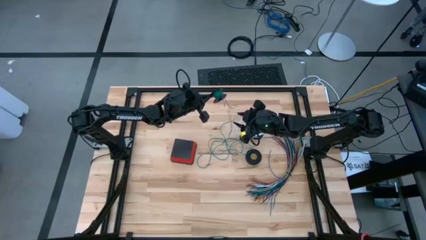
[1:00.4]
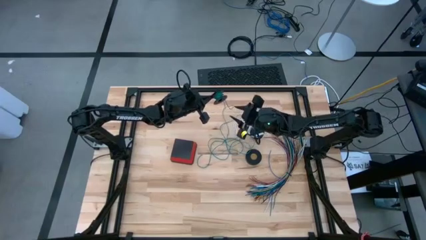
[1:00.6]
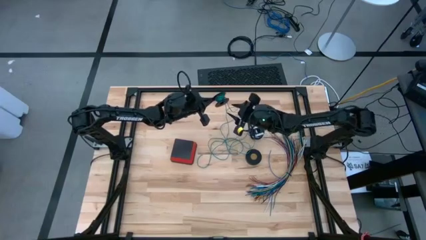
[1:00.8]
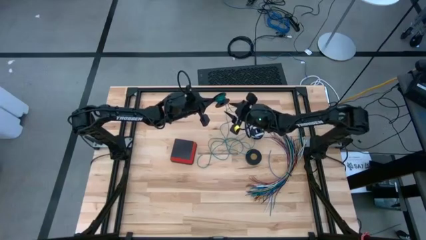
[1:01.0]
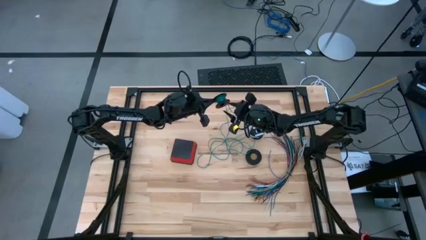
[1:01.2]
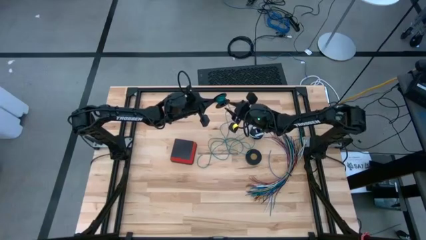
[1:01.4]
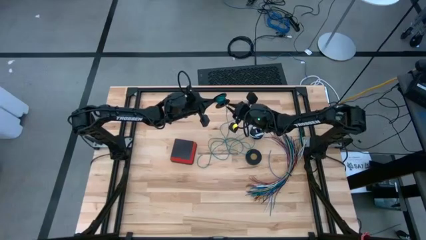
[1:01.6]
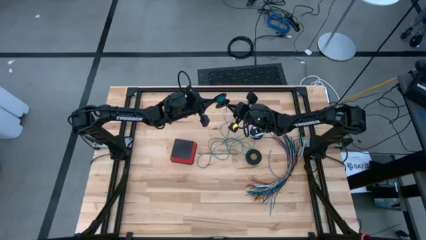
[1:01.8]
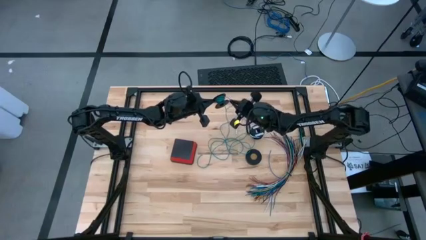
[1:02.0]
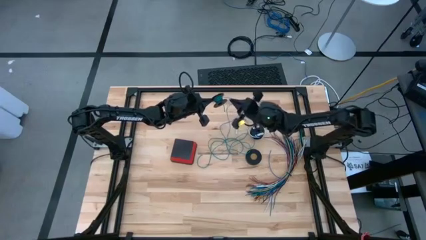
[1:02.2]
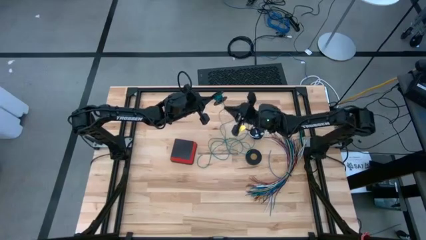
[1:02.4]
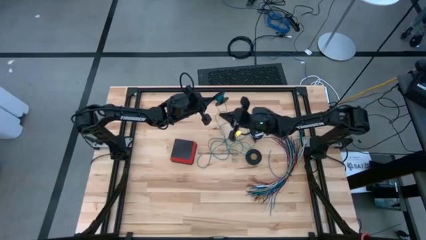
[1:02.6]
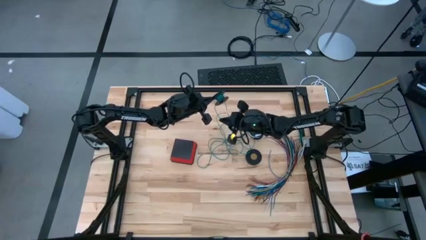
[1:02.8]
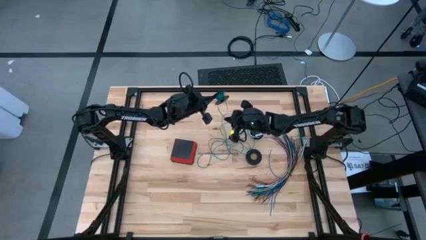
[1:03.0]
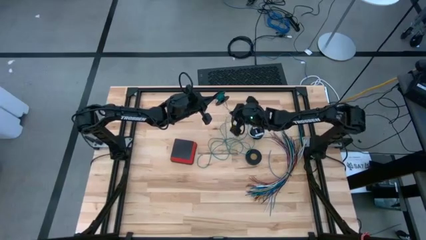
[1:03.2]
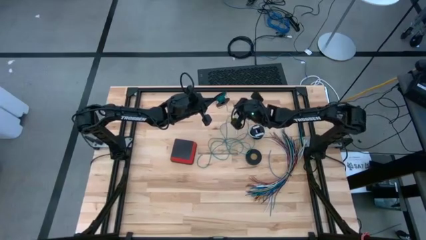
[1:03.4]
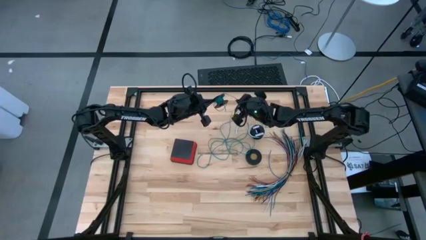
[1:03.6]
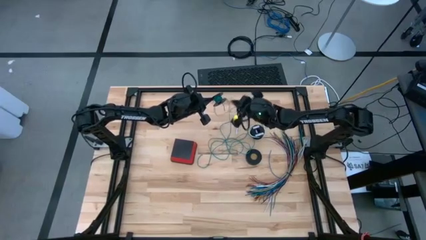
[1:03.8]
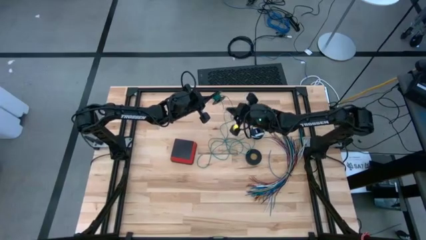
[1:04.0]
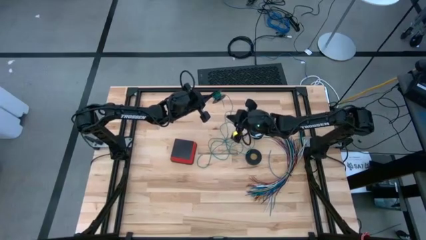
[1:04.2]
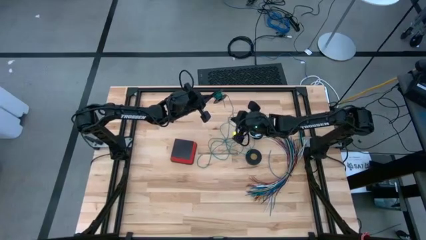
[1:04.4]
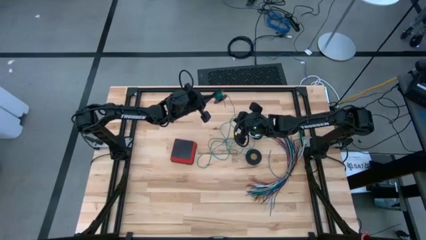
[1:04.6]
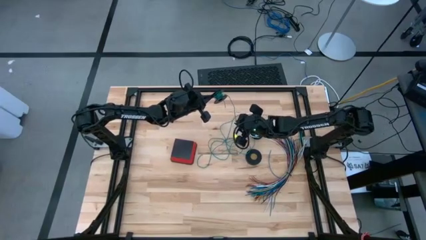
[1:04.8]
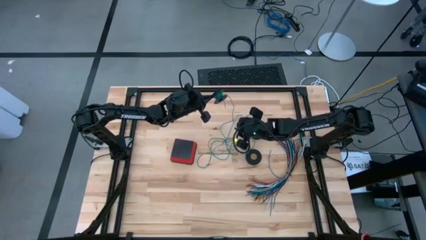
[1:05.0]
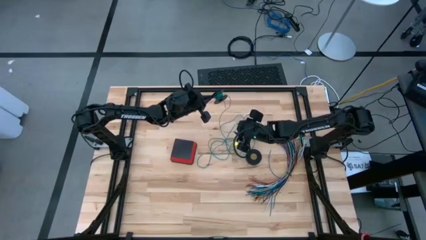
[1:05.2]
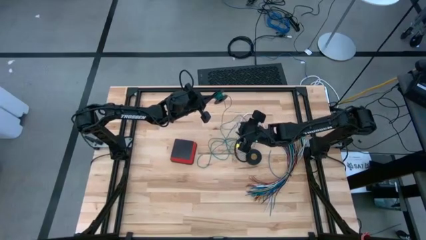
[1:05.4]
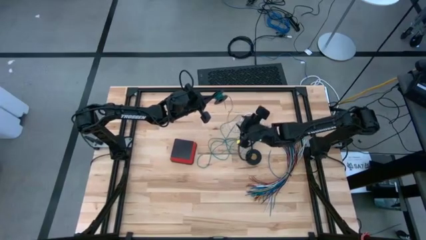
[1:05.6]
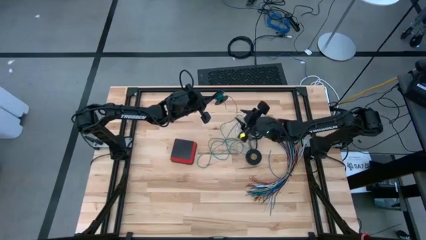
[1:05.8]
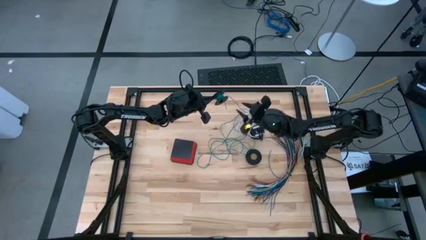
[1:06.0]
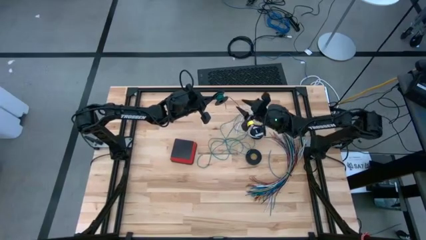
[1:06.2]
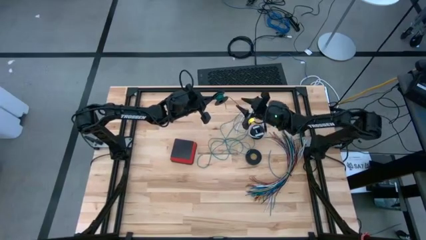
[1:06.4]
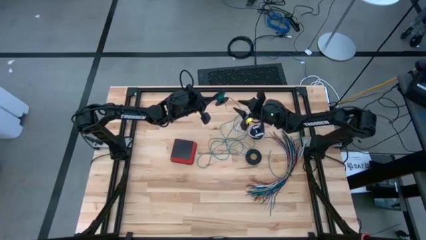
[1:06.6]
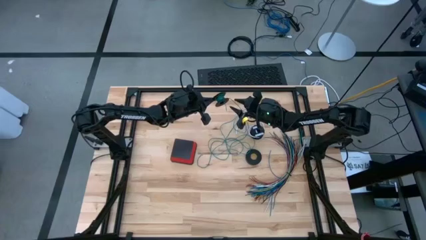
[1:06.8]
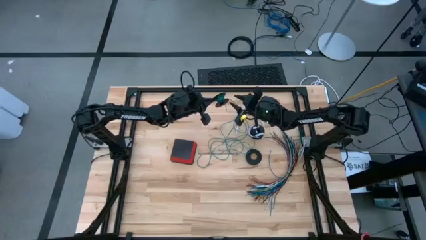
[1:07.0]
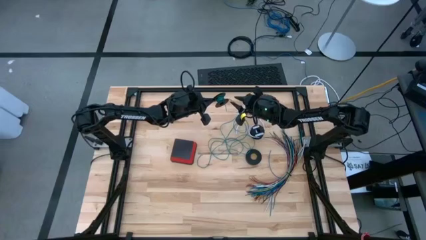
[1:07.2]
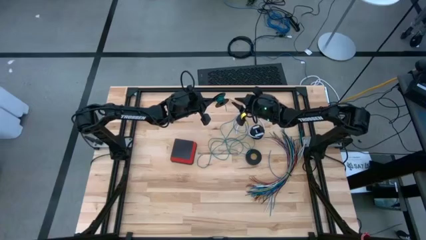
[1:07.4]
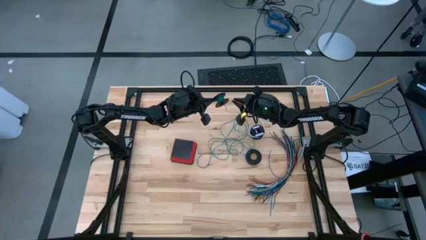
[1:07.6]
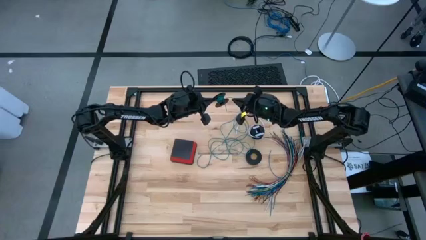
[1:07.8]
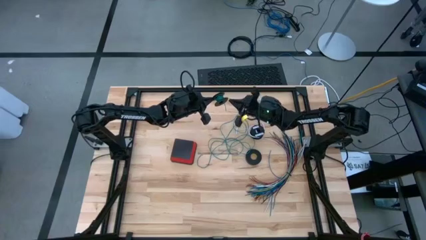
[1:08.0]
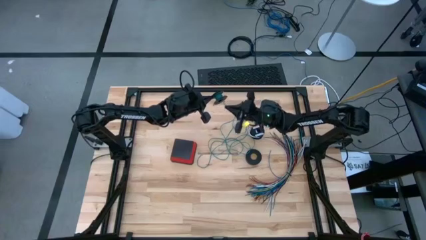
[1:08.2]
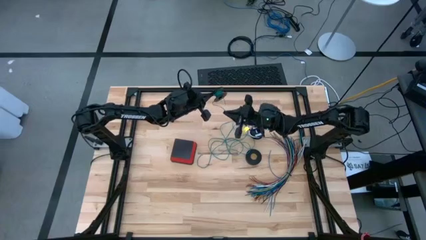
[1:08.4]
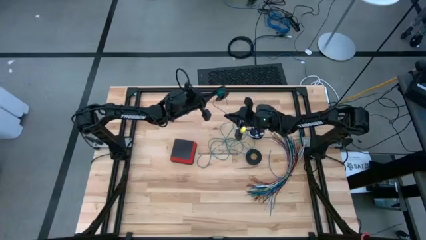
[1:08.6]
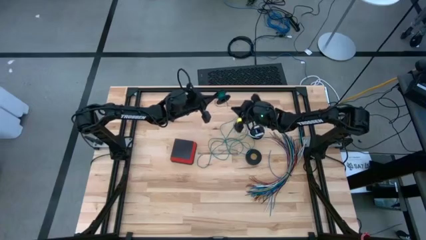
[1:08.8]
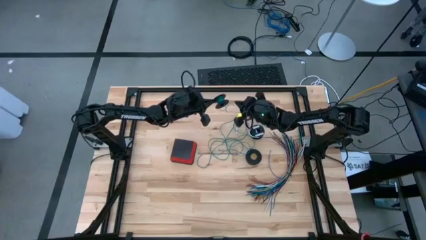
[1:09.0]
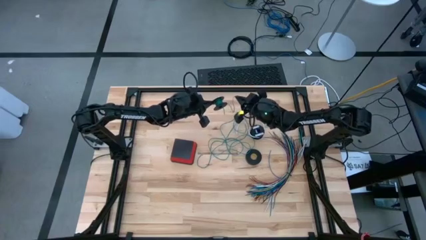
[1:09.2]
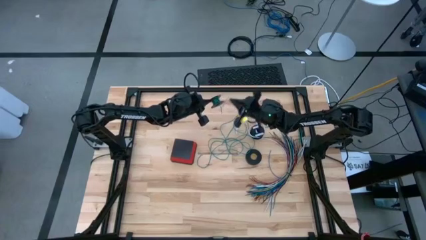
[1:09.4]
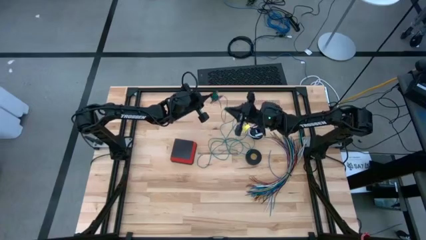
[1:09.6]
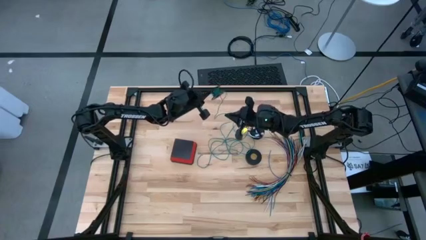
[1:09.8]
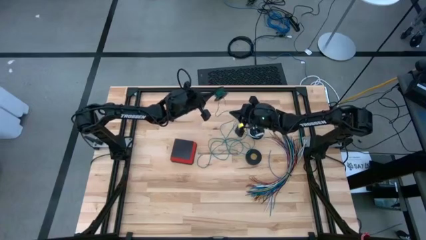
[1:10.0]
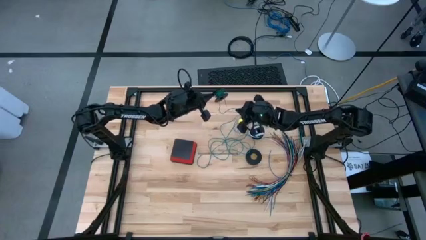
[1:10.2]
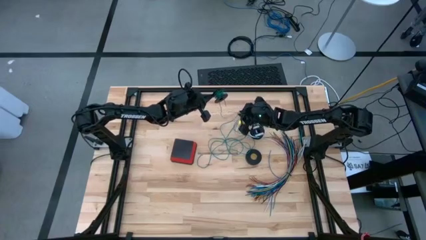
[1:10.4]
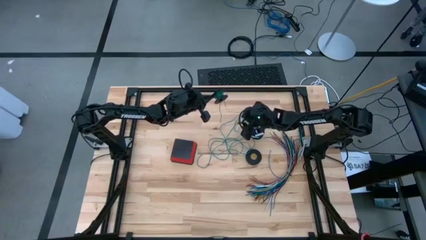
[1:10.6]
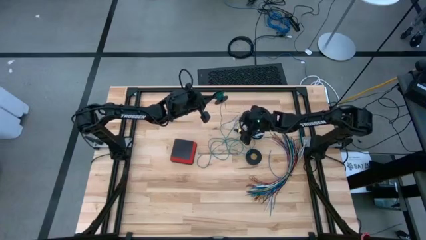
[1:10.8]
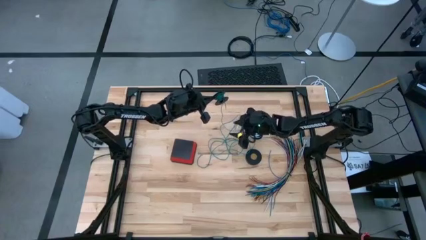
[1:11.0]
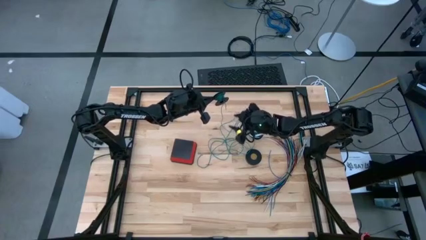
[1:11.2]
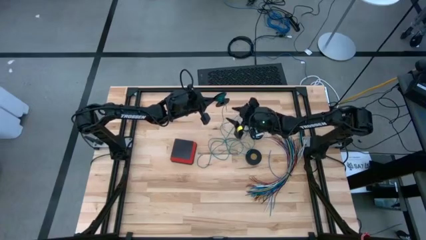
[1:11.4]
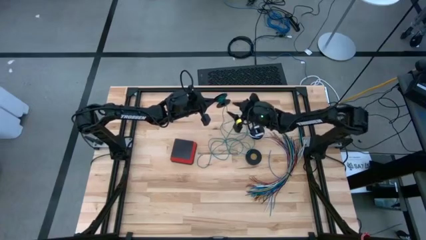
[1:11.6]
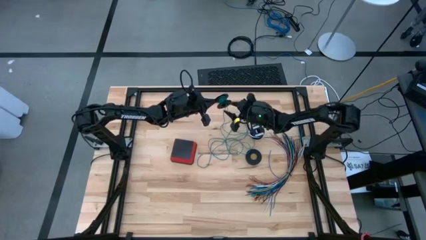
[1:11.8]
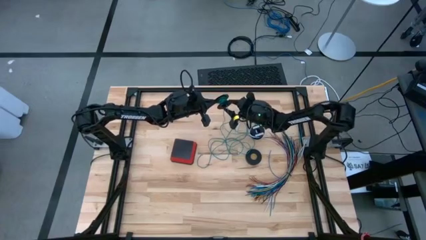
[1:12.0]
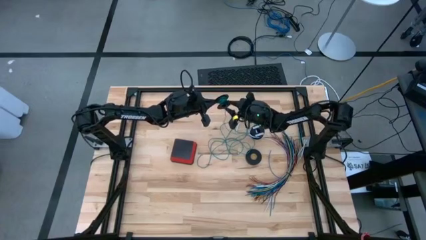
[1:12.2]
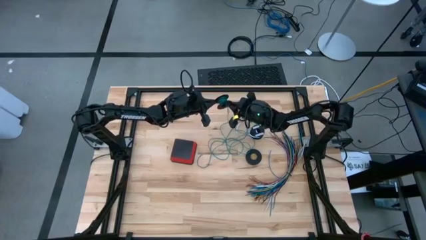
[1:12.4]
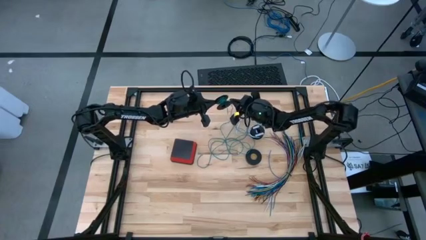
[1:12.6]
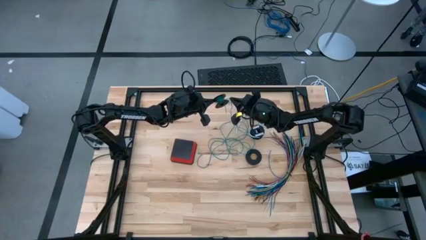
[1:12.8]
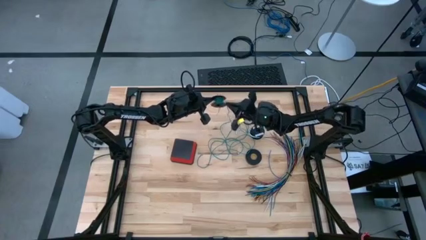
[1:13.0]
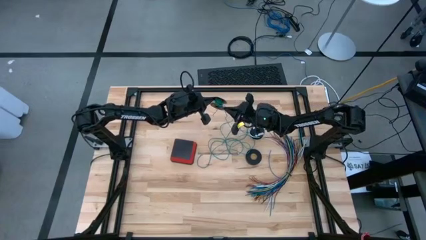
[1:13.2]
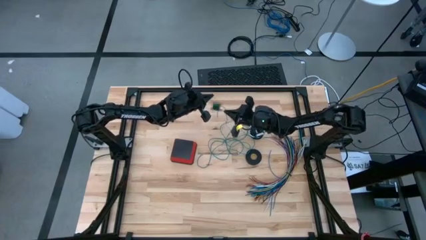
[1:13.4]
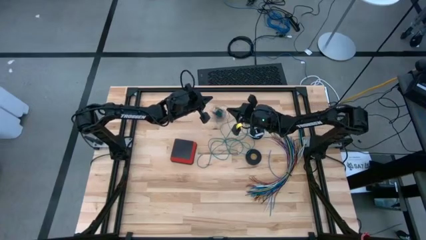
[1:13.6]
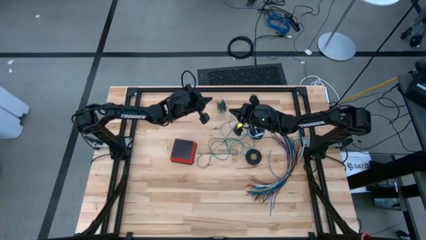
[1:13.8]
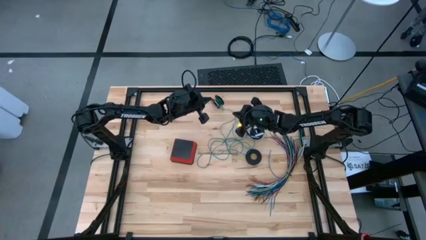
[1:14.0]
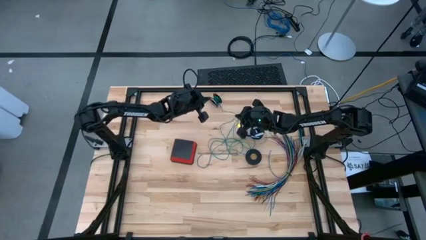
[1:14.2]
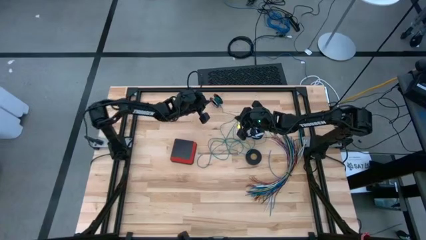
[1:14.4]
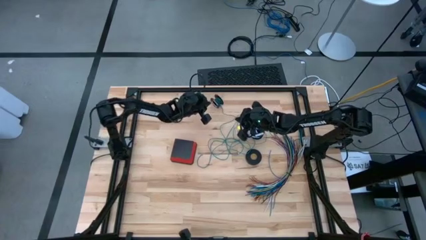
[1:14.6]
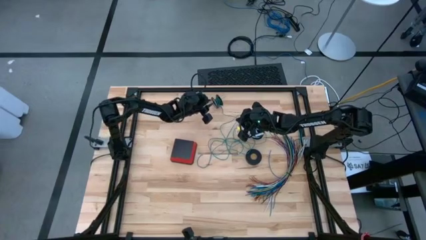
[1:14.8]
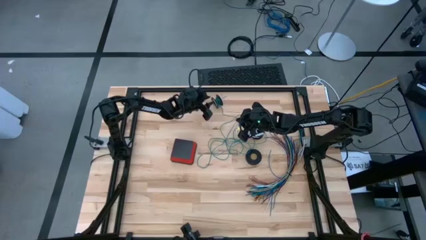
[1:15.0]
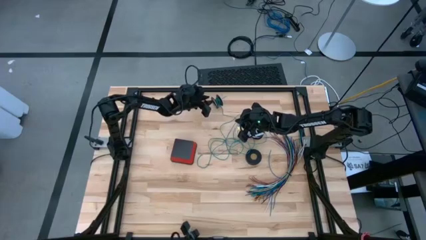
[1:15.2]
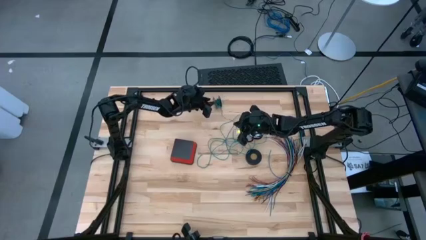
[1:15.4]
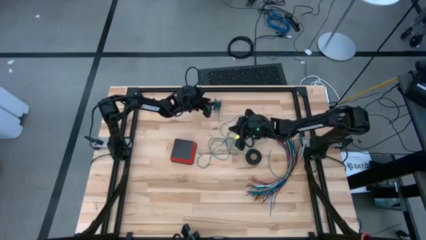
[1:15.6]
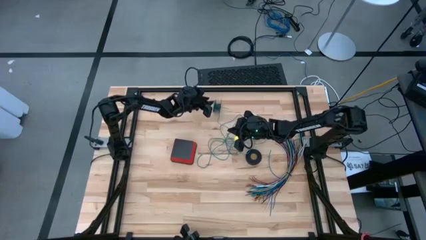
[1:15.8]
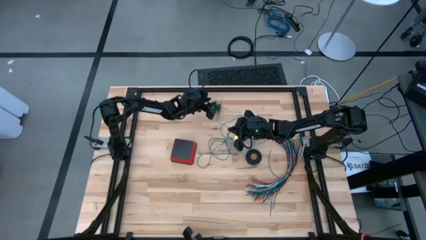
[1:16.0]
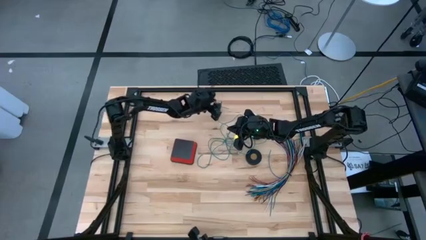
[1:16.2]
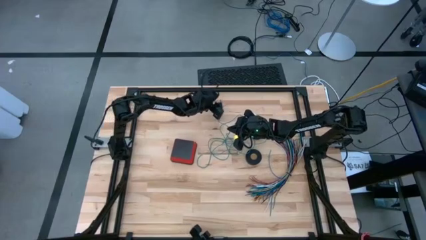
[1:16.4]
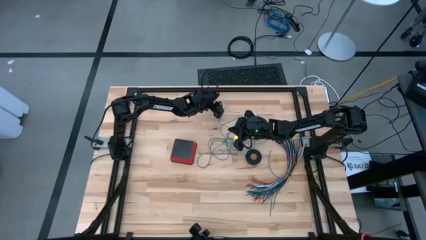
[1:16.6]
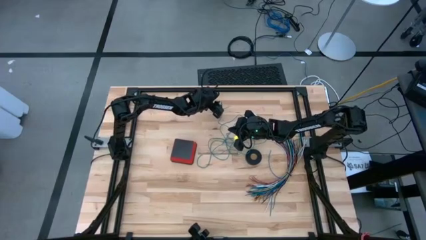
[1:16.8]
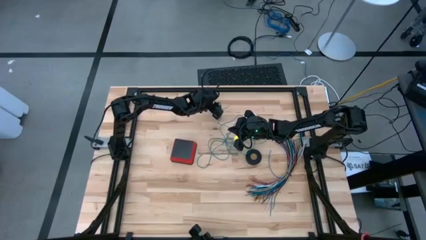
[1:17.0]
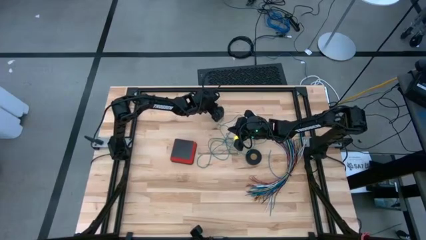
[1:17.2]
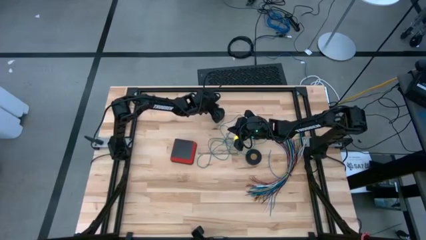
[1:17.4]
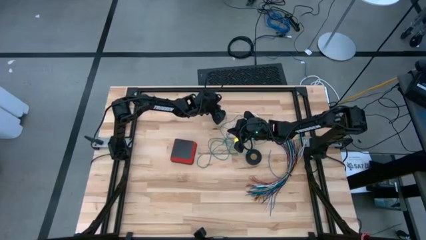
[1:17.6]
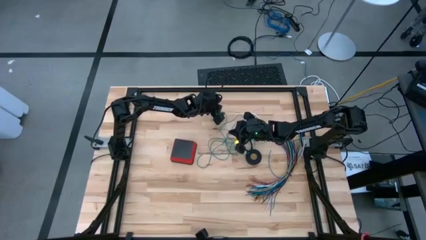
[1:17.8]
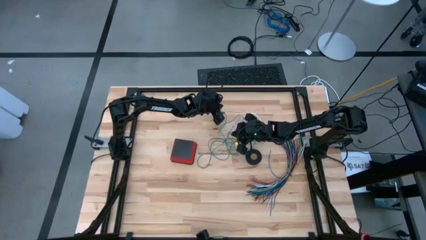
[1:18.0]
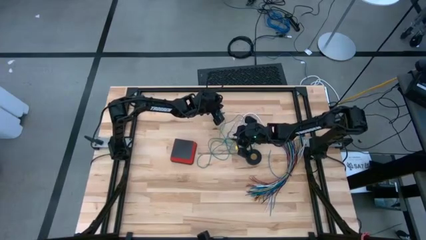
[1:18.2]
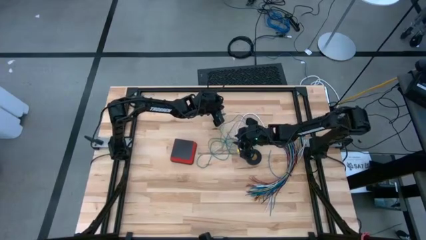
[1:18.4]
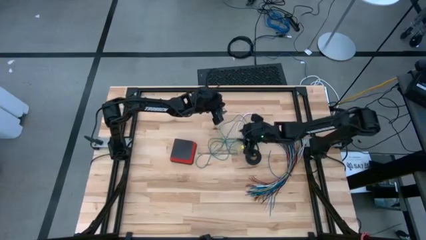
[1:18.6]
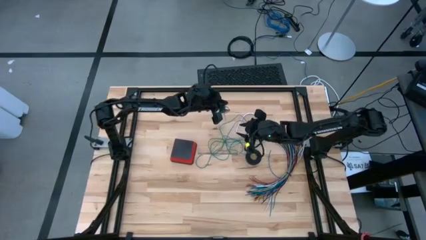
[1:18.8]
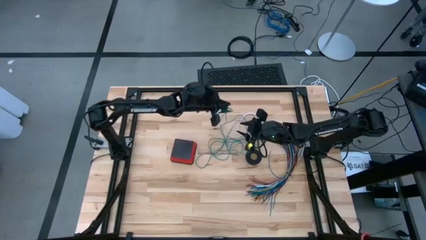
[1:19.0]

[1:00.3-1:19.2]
Task: Coiling cords
Uncoil the green wire cable from the spool
